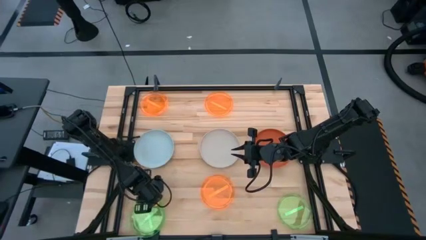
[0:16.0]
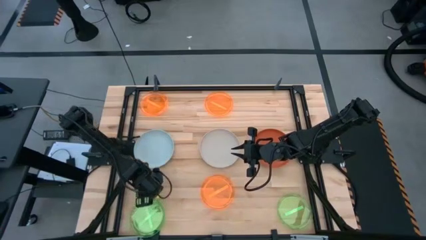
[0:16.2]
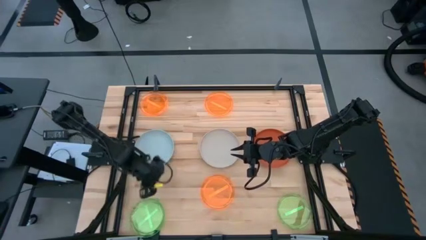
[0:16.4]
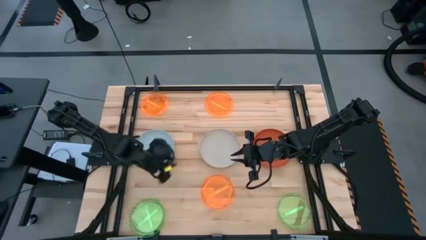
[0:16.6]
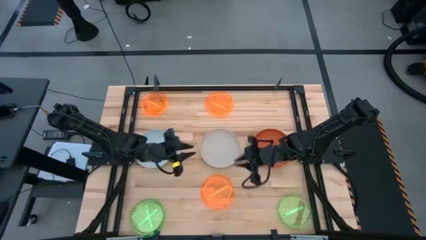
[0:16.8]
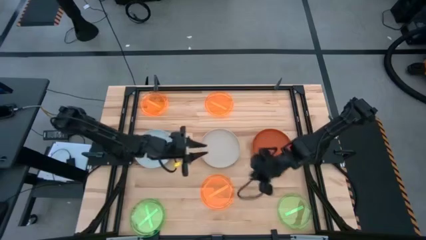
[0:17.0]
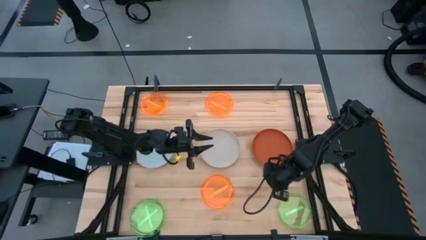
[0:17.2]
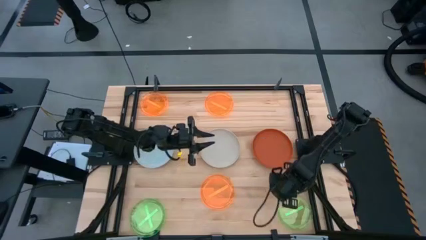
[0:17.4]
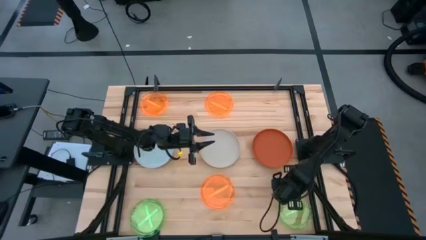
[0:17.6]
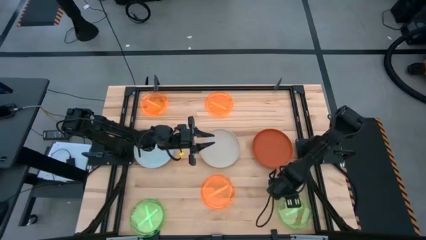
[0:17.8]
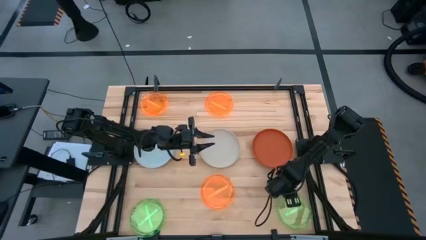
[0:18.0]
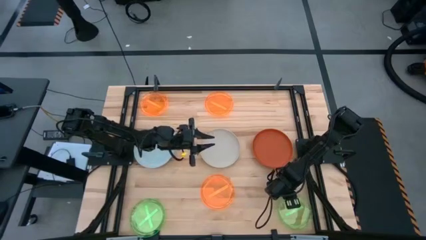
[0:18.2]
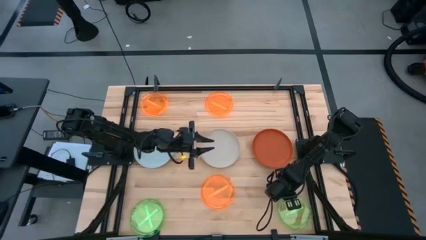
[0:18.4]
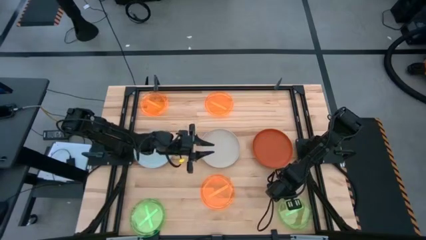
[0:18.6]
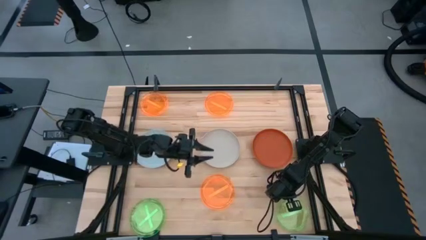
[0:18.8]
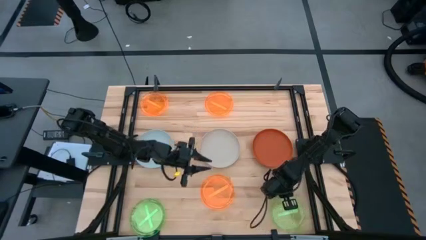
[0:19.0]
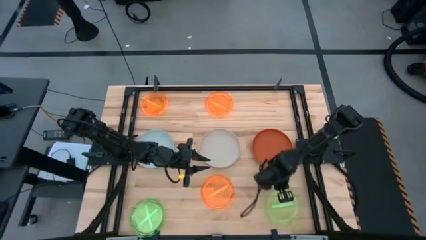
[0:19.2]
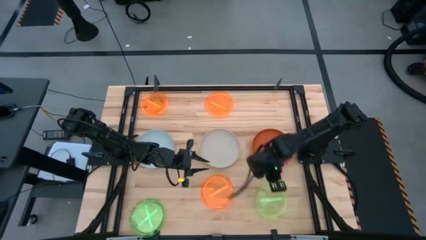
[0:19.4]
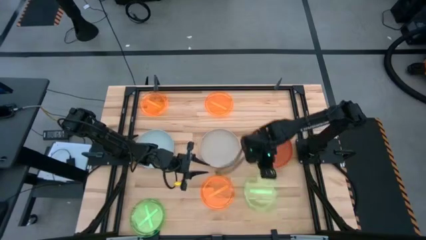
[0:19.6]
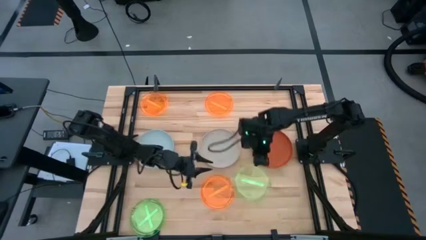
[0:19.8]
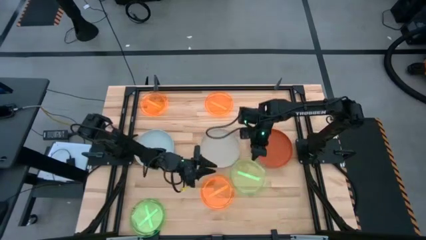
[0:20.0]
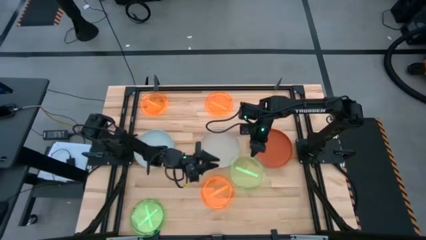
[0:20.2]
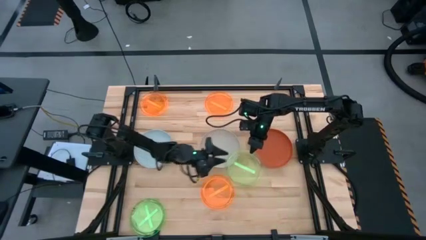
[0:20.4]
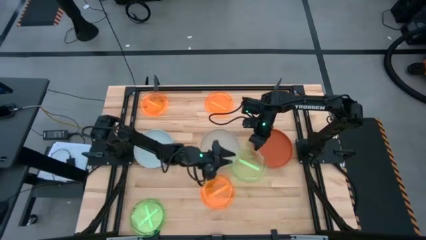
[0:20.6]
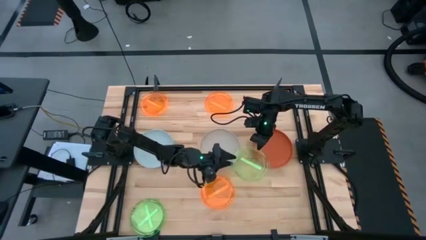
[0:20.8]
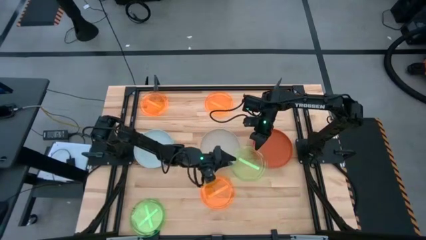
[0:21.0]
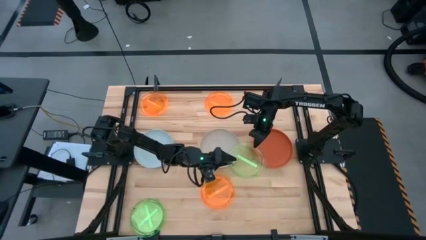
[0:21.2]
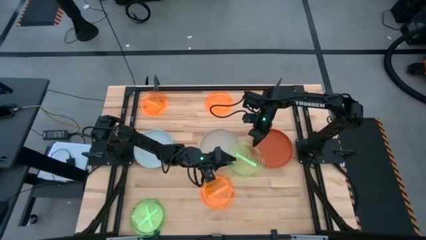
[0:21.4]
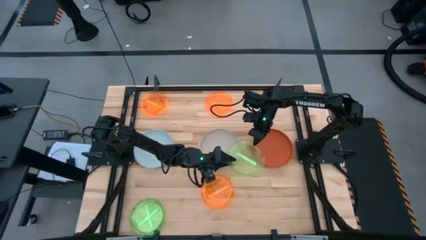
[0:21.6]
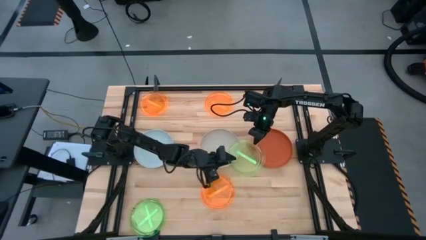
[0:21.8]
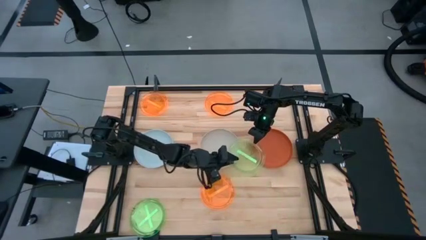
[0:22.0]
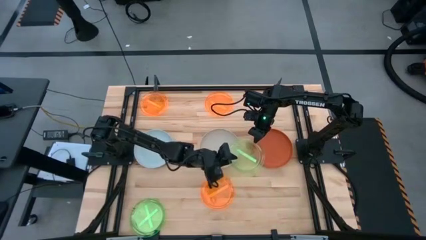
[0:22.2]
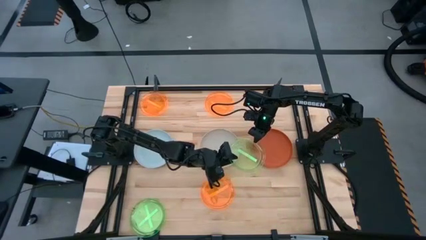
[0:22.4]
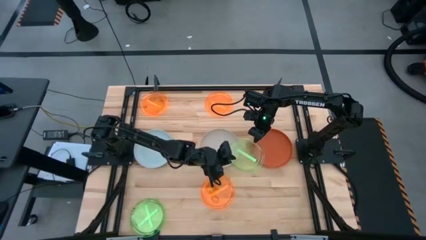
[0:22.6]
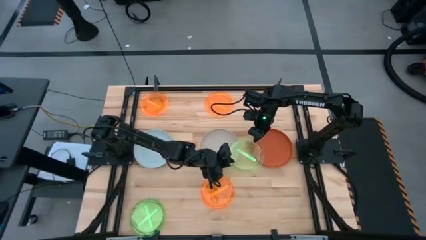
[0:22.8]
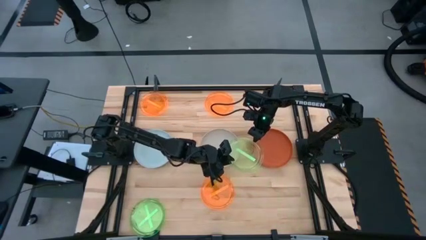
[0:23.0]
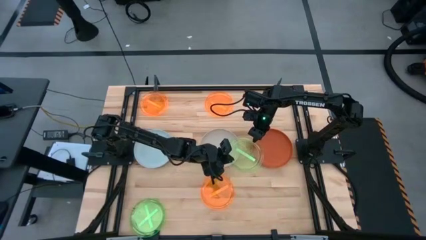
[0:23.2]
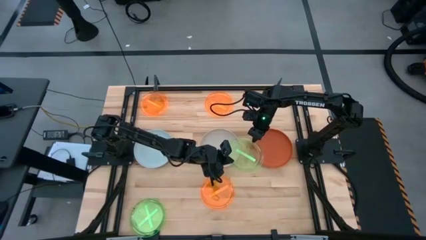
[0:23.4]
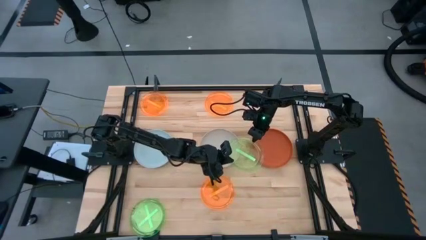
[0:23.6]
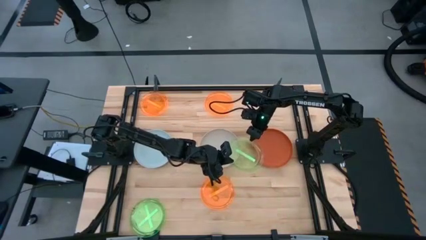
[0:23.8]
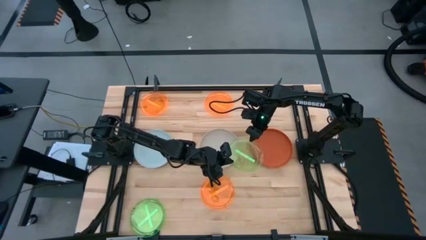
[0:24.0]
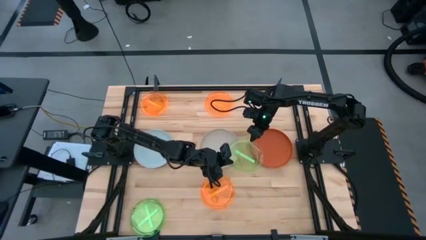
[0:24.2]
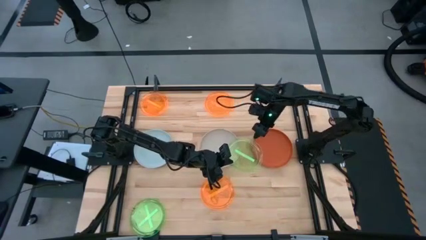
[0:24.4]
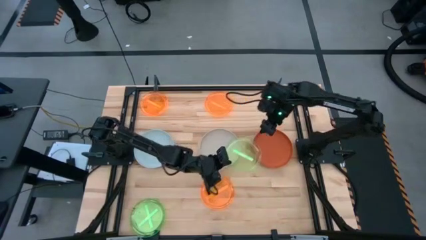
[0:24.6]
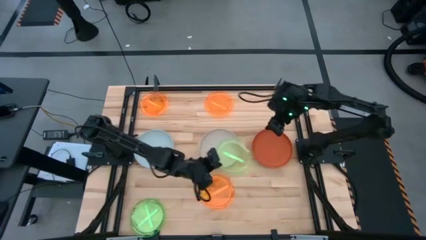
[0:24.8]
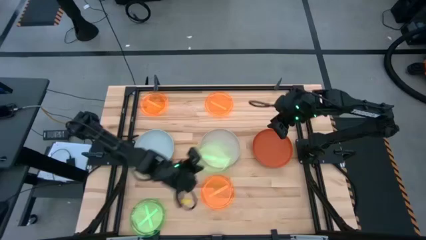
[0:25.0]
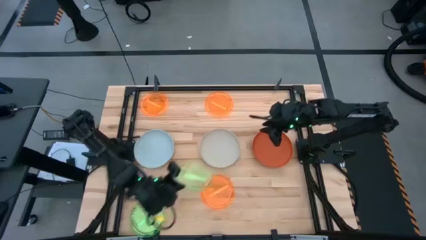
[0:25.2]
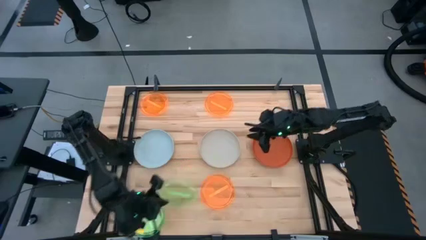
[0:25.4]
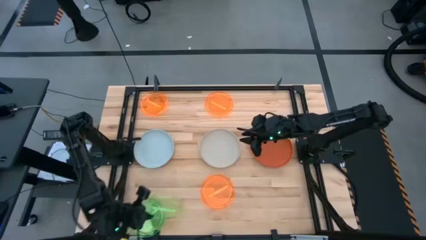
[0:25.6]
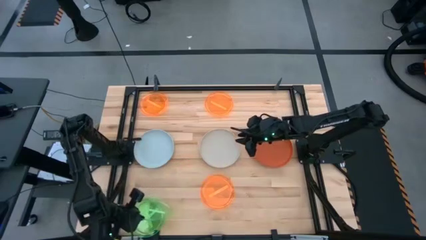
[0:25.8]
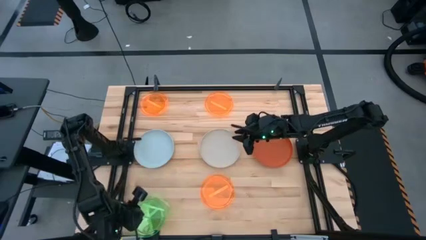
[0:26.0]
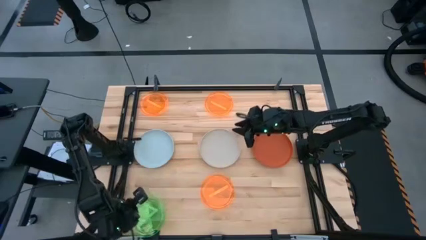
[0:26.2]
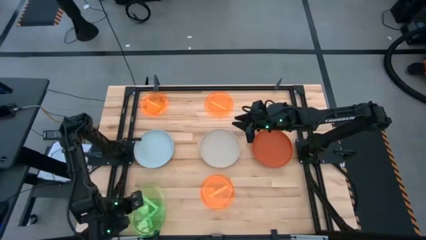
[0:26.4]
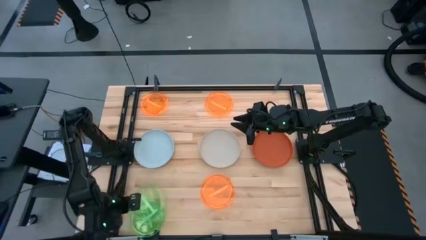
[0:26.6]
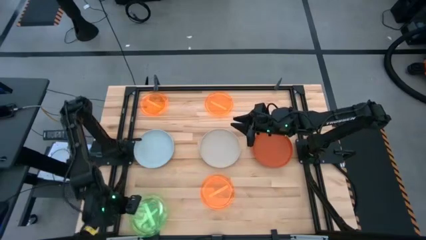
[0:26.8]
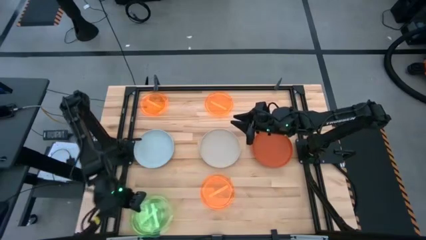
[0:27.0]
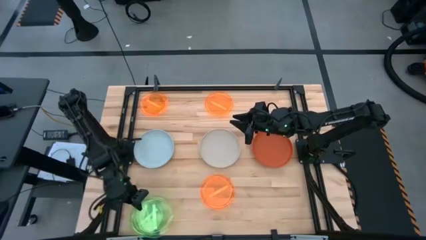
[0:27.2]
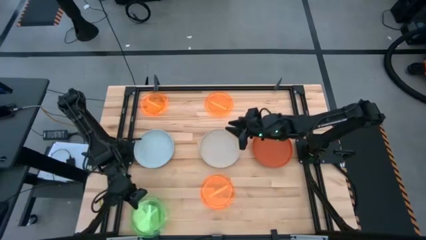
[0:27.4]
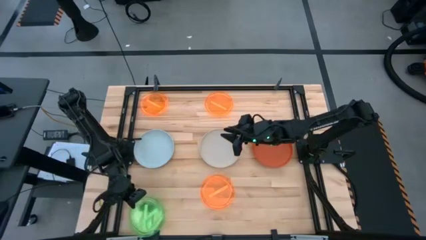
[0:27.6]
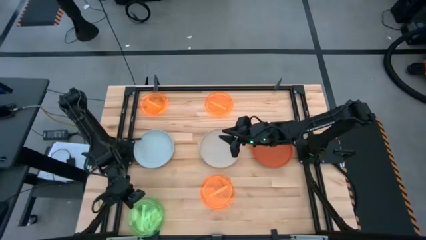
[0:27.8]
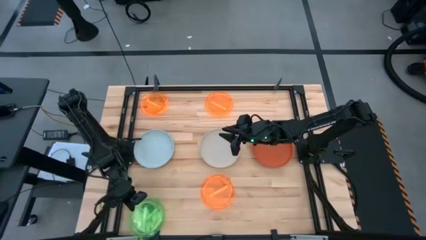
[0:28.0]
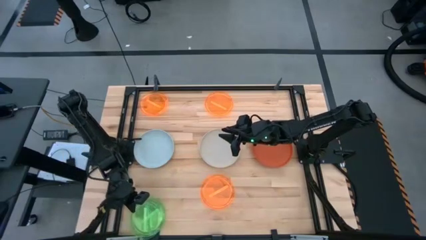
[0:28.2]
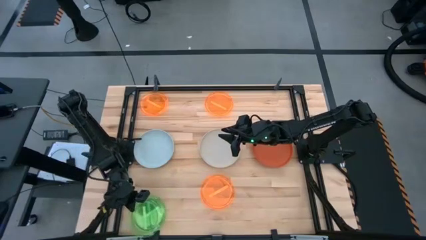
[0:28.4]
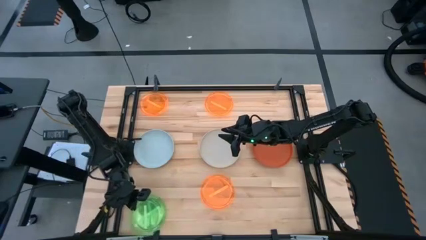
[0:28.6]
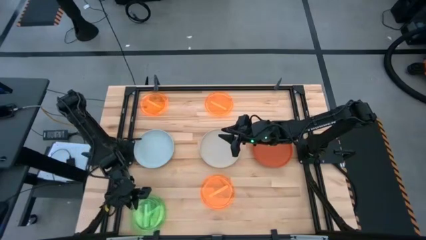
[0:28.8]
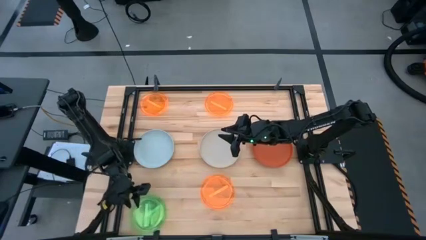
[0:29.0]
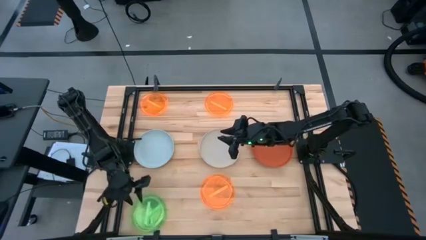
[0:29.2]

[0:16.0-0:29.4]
Task: Stack plastic plates
Stack the right green plate on top of the left green plate

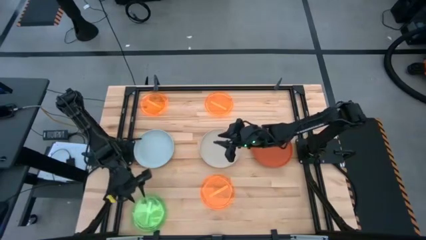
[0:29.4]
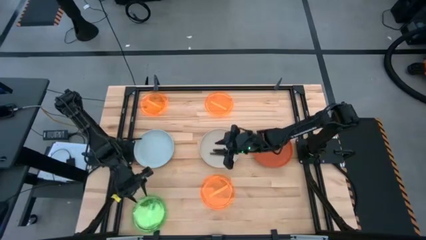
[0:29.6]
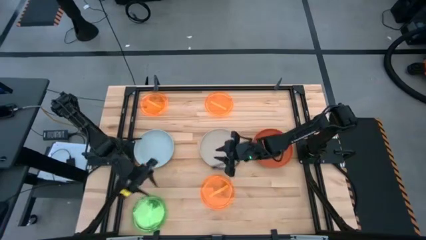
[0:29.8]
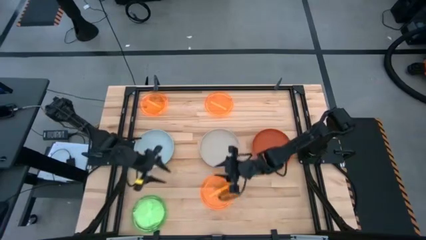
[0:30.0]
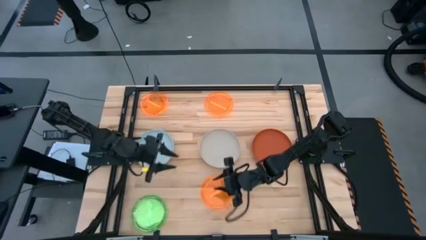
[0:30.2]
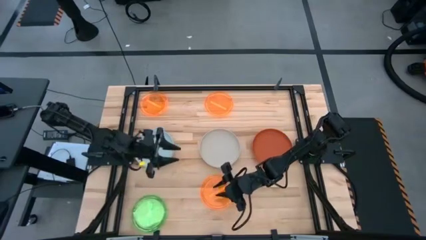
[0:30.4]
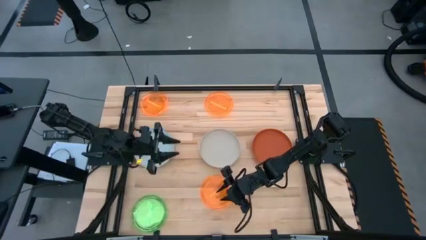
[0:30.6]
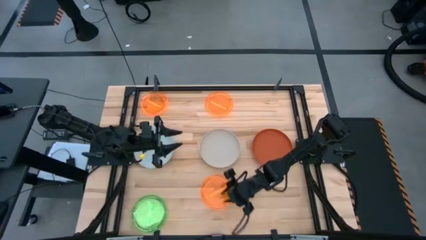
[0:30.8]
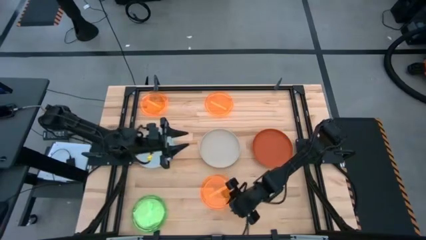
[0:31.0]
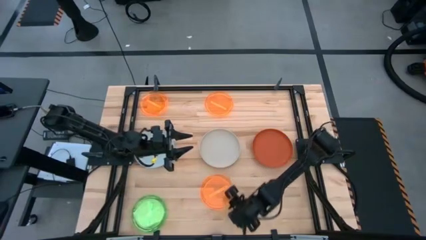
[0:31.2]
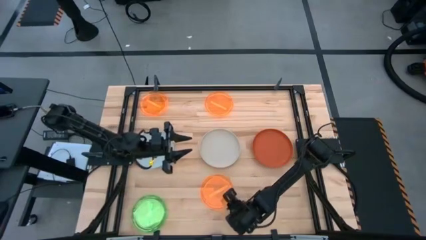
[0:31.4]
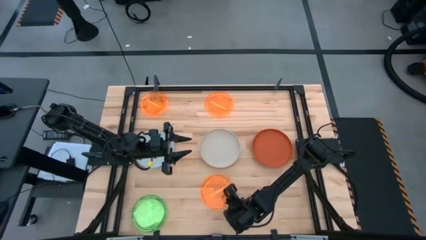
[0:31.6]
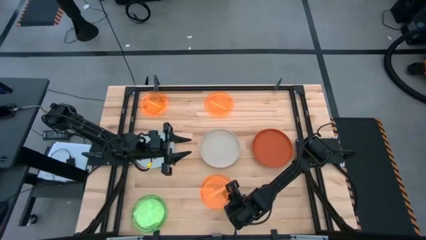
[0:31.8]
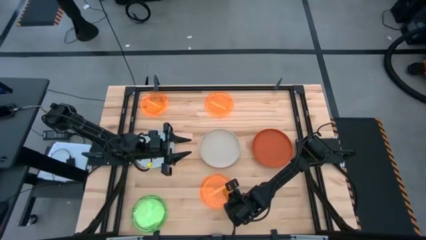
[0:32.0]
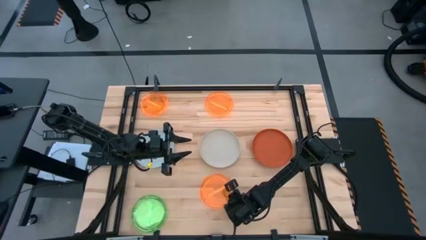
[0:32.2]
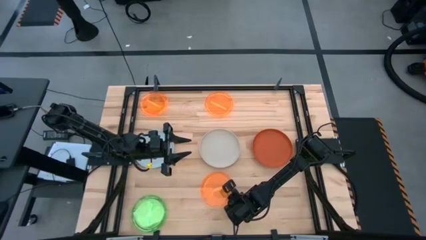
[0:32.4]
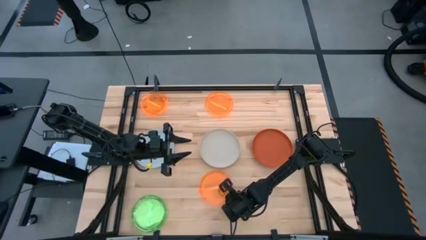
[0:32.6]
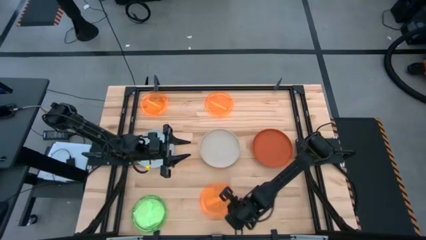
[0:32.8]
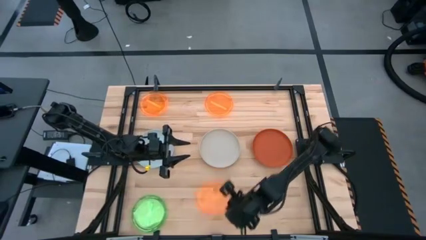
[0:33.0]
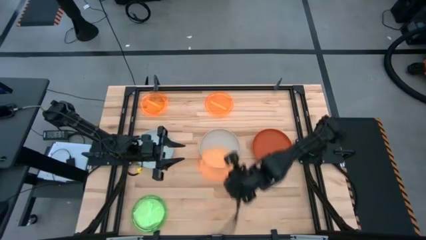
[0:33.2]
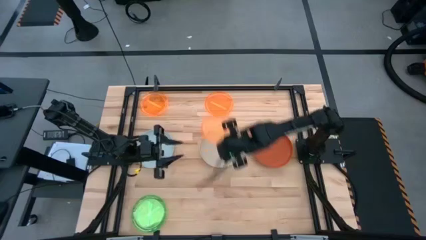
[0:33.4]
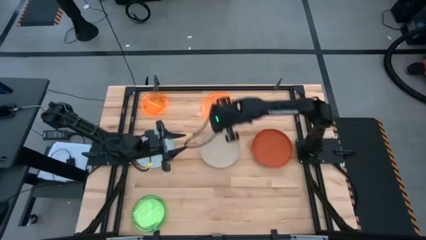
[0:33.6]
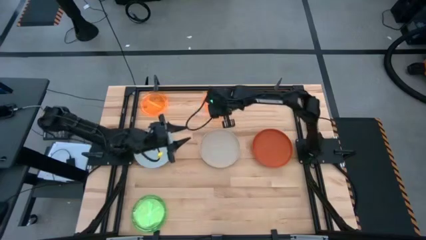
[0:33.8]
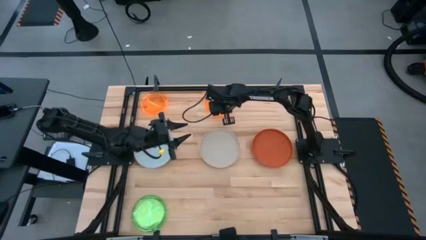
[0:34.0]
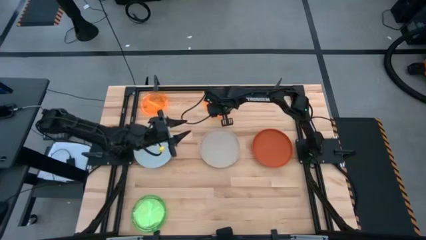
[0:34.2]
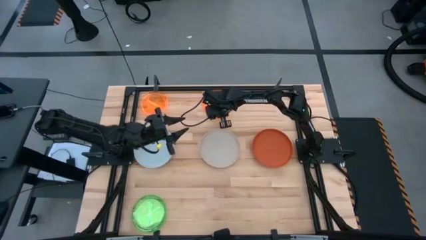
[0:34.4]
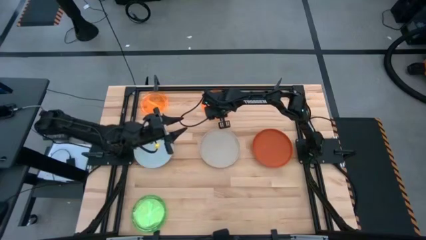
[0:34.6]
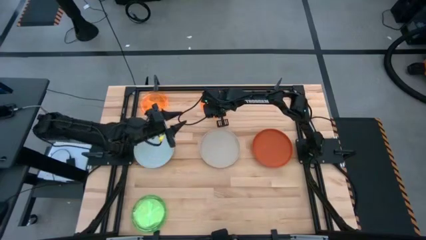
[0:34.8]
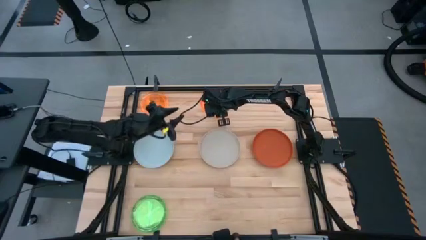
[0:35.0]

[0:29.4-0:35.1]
Stack the bottom right light orange plate on top of the top right light orange plate
